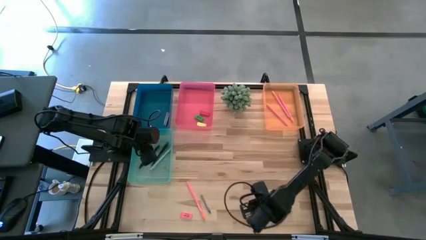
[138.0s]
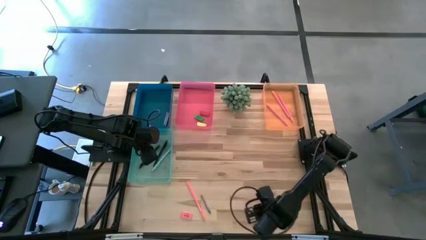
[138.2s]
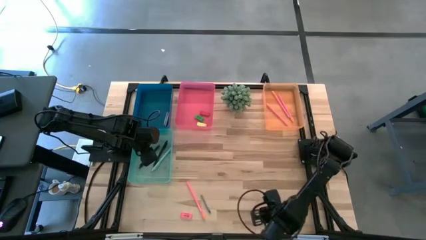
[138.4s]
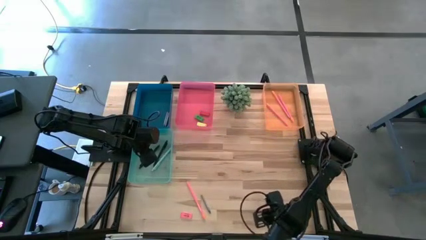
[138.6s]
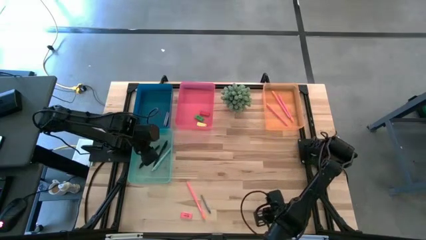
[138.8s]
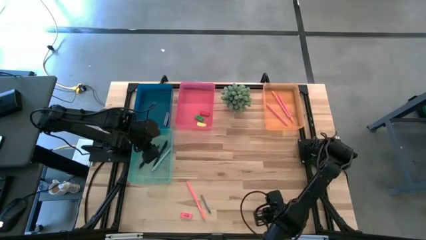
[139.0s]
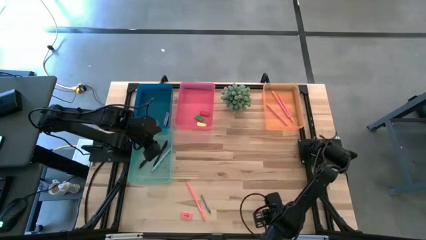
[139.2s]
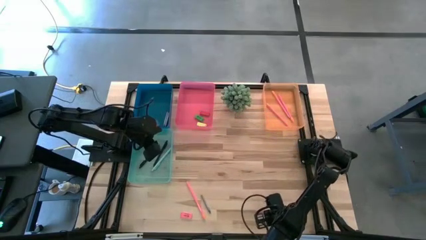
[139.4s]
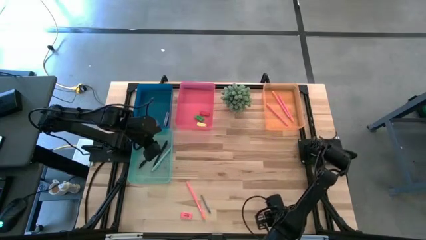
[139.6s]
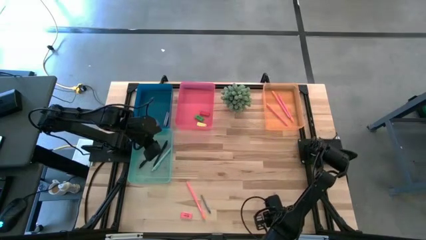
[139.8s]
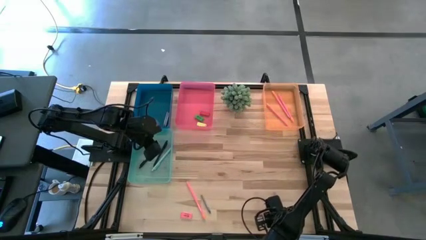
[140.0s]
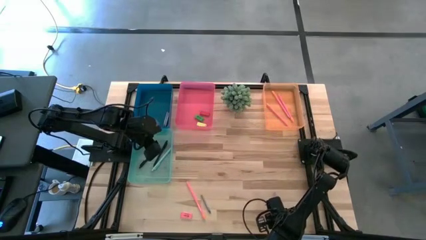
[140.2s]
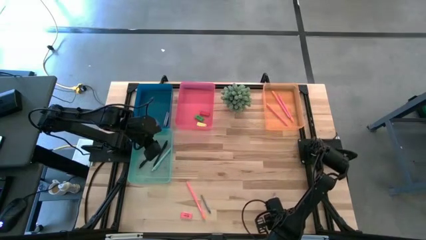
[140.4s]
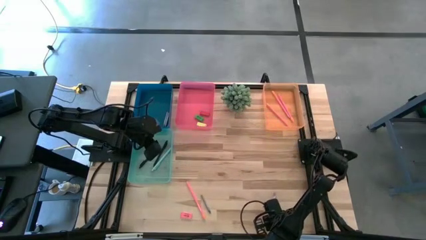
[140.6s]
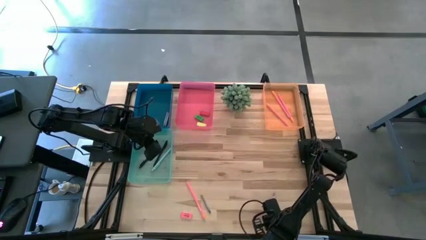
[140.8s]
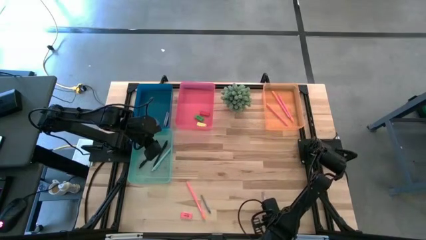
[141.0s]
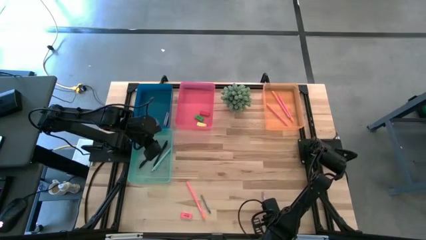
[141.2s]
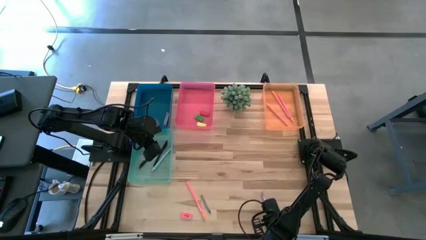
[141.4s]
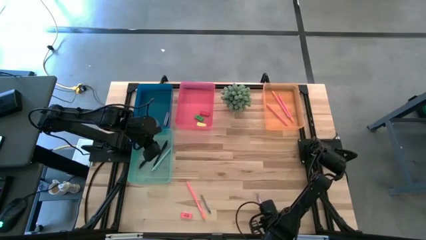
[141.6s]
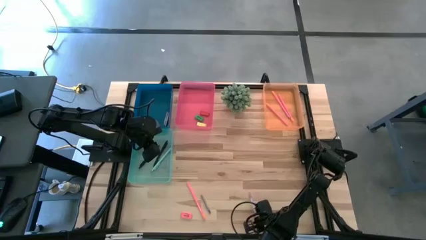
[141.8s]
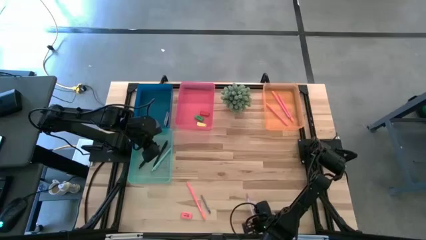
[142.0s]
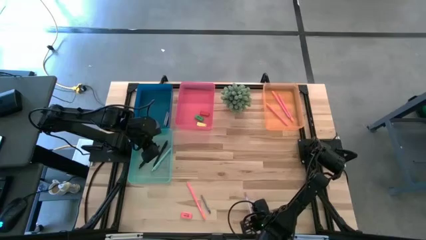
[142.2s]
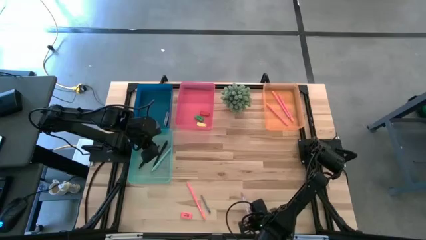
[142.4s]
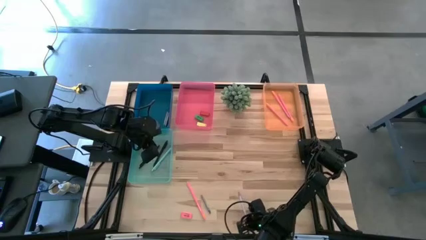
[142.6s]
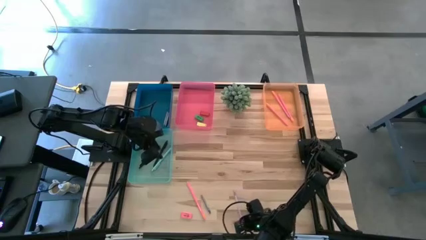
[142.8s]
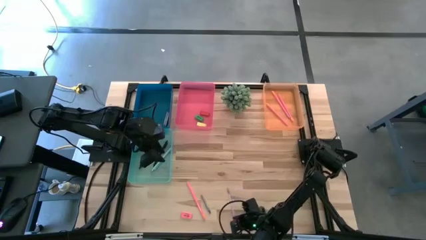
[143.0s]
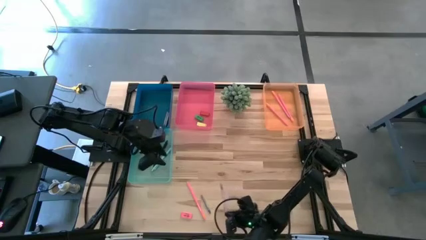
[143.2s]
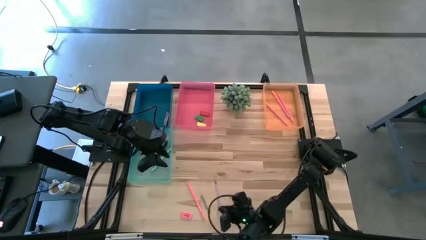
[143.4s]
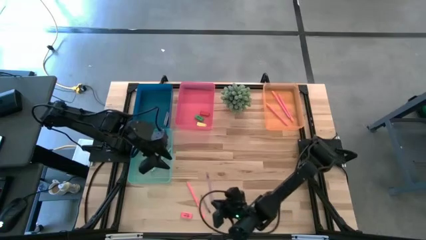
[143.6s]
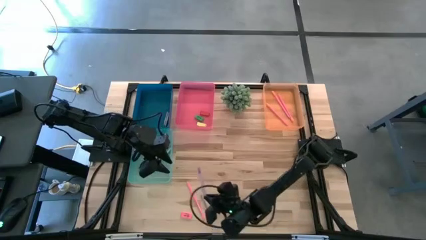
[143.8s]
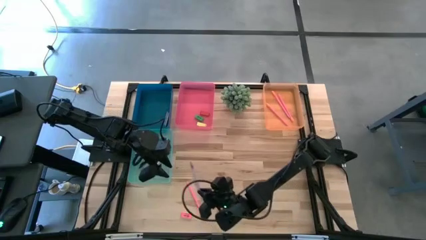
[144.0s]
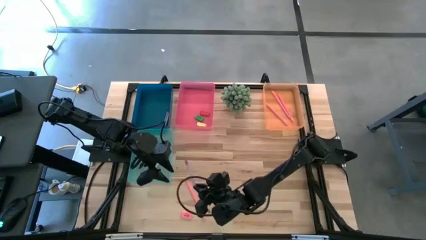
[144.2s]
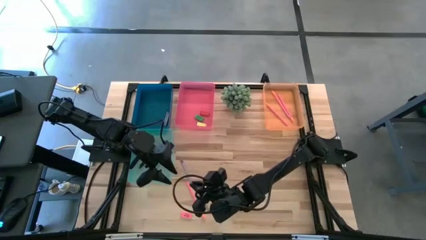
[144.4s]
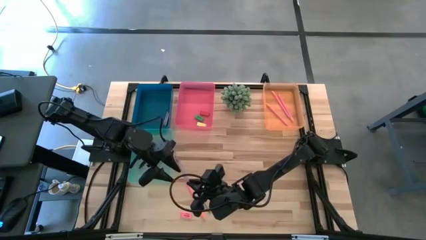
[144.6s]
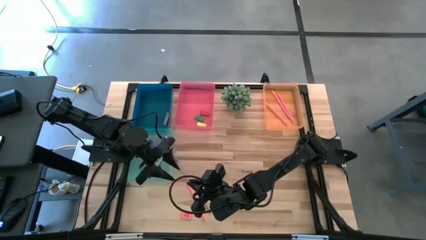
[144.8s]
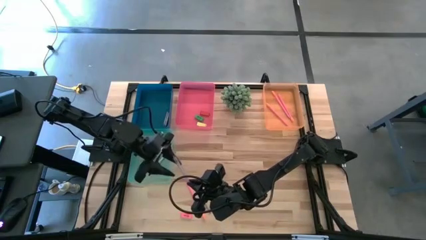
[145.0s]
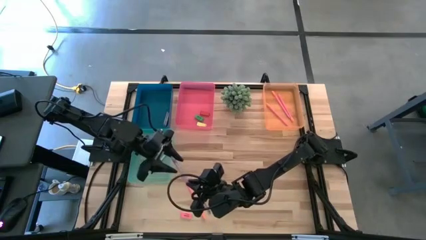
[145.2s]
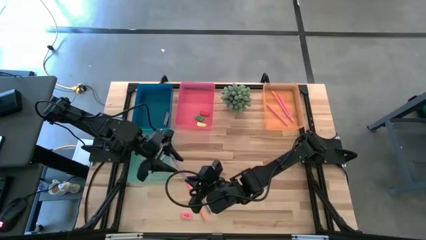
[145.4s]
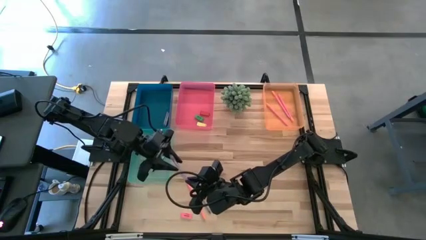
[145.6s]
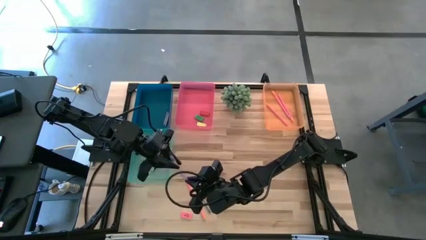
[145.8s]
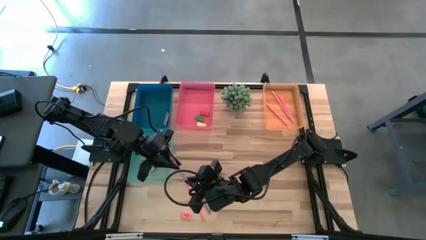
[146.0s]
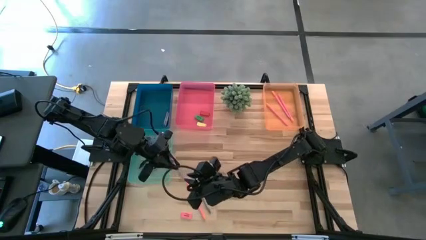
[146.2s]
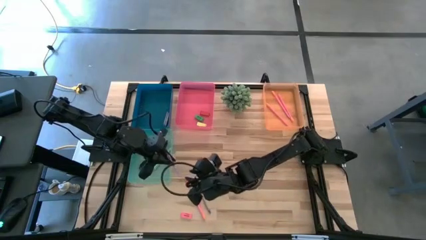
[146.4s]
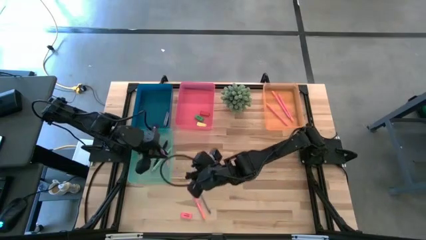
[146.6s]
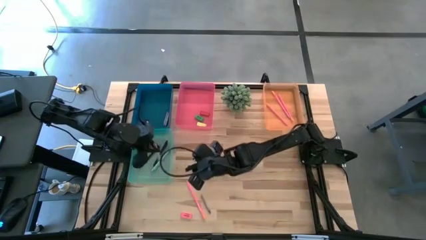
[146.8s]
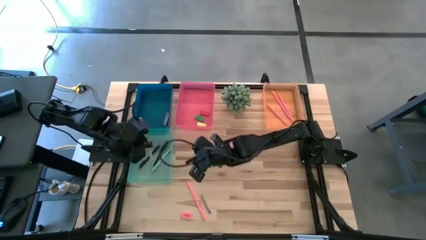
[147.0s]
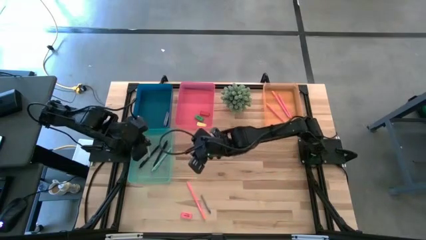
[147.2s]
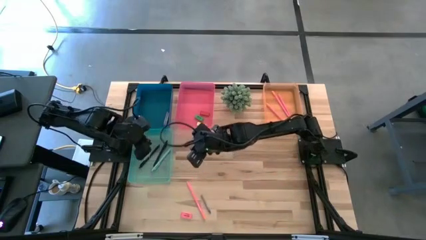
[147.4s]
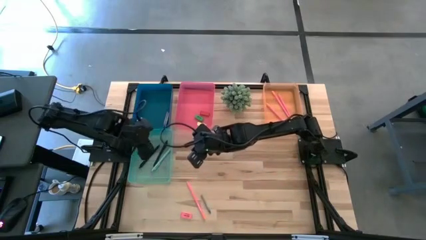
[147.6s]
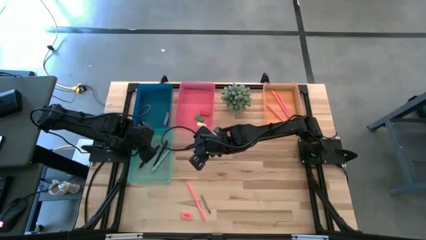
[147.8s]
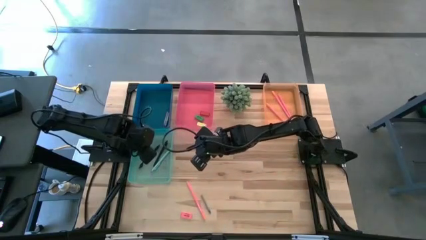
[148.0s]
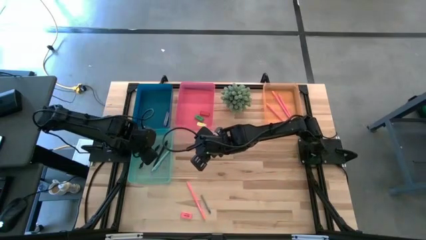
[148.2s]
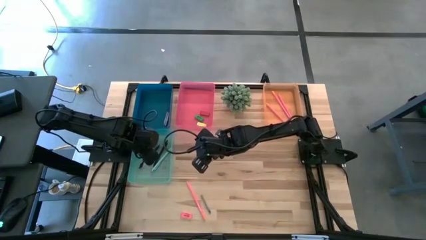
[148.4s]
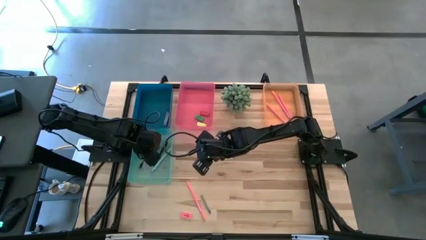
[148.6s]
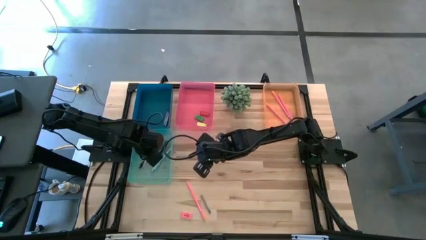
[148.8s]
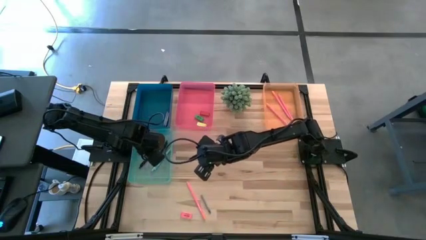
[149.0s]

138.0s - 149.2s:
Task: Sort crayons/erasers/pens/pencils in bins
Put the purple pen into the light blue bin

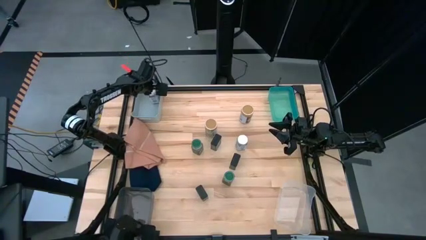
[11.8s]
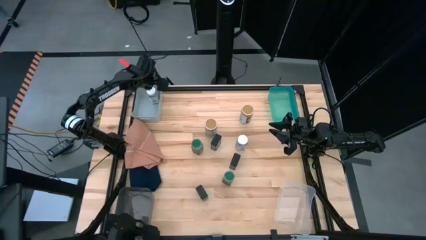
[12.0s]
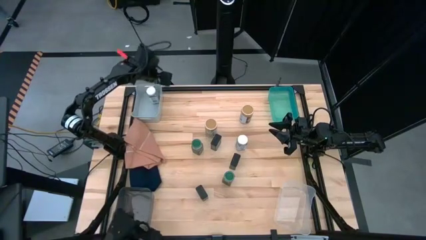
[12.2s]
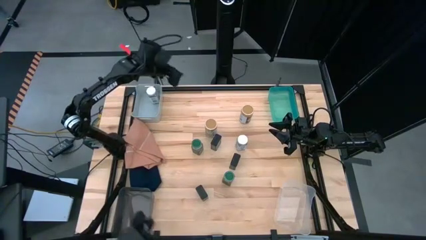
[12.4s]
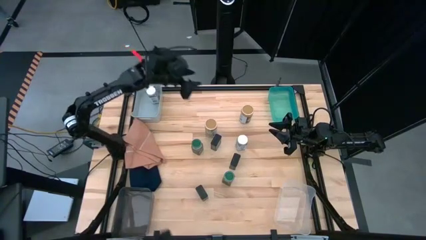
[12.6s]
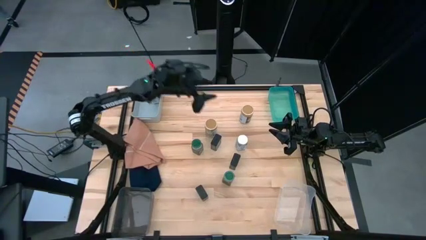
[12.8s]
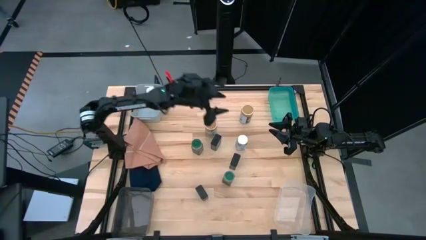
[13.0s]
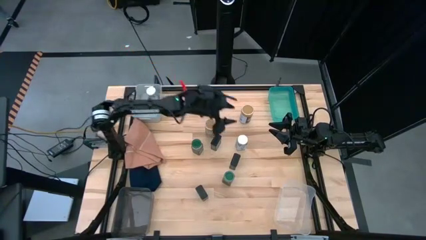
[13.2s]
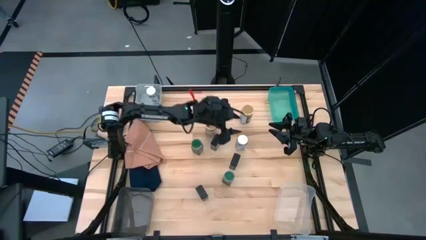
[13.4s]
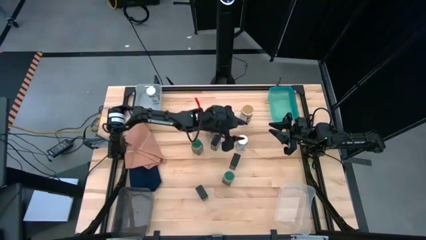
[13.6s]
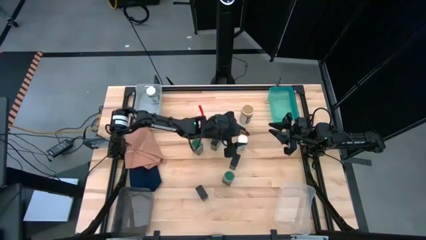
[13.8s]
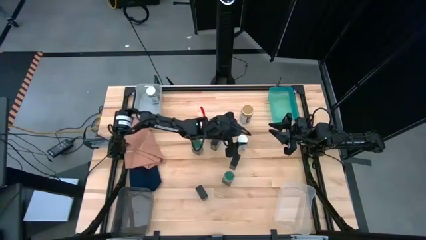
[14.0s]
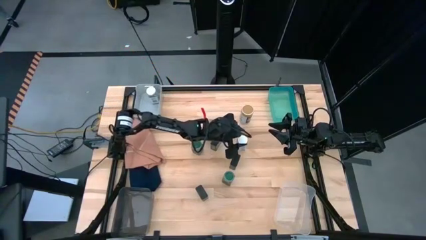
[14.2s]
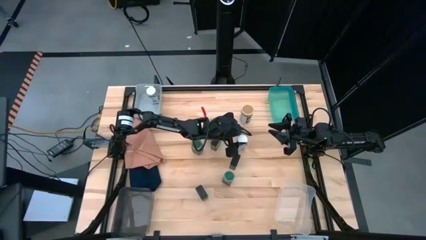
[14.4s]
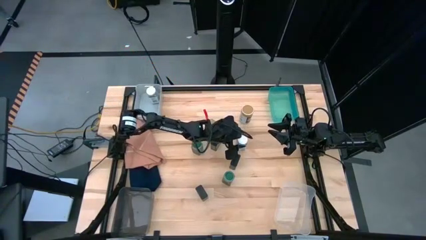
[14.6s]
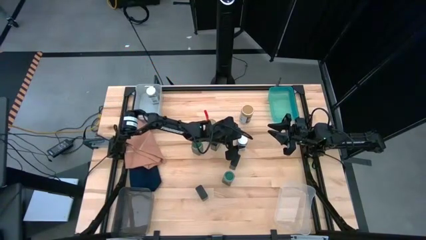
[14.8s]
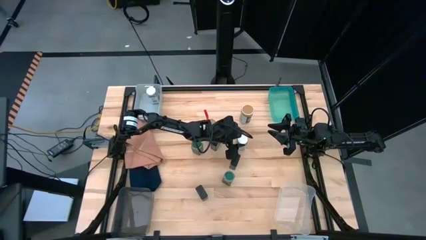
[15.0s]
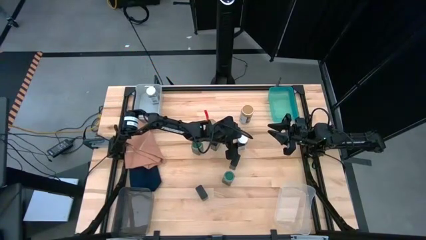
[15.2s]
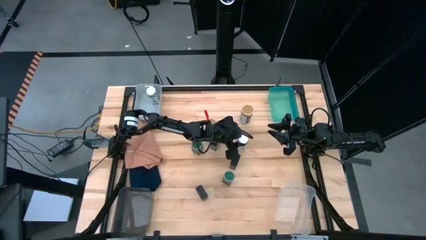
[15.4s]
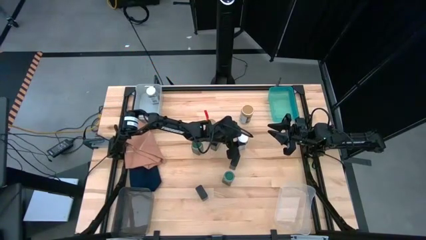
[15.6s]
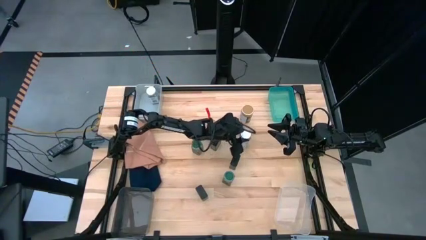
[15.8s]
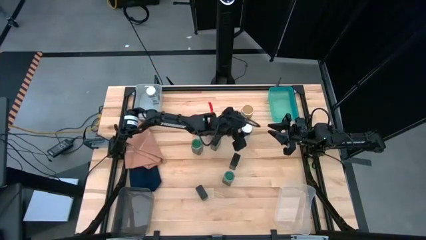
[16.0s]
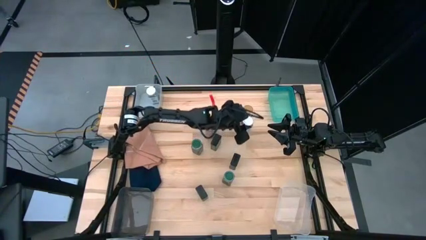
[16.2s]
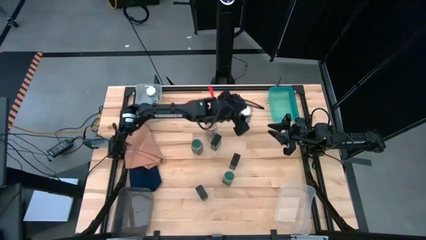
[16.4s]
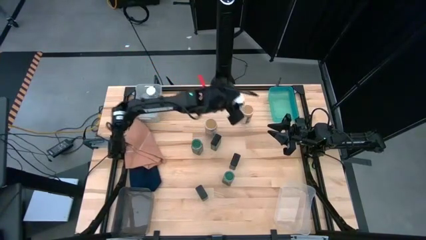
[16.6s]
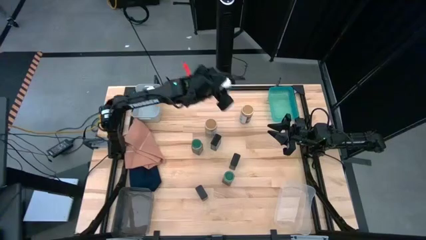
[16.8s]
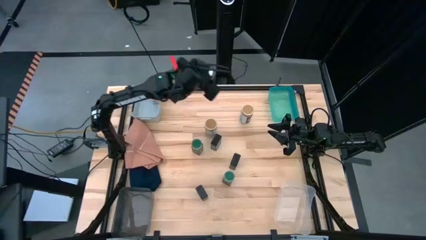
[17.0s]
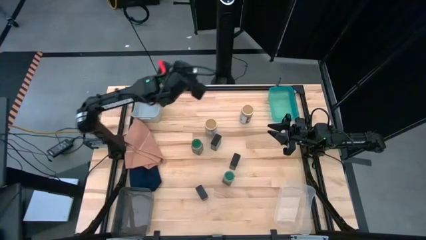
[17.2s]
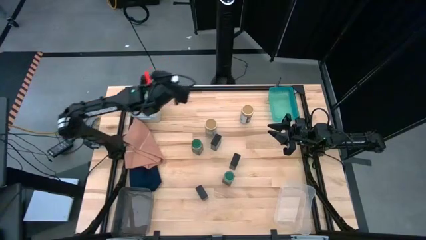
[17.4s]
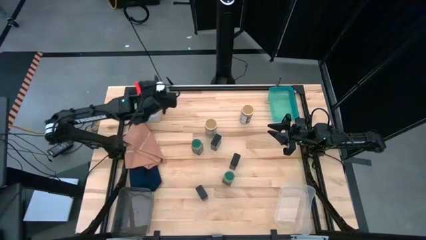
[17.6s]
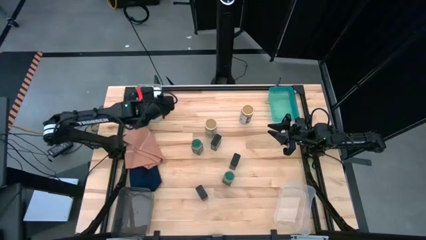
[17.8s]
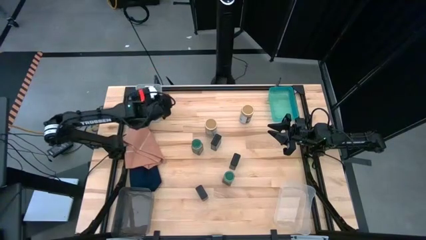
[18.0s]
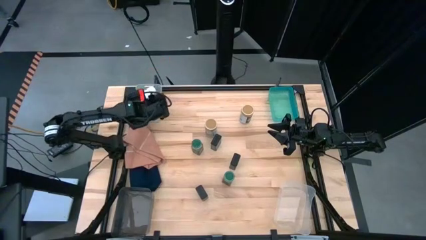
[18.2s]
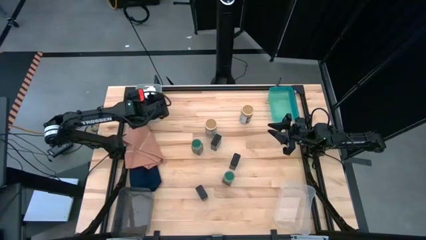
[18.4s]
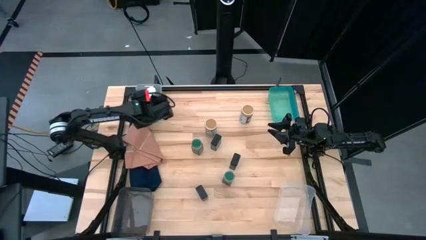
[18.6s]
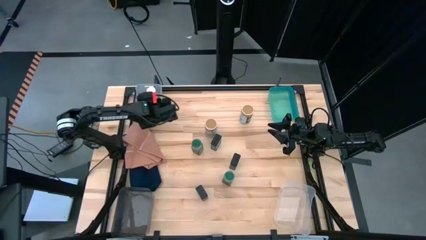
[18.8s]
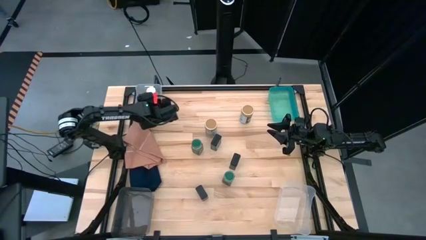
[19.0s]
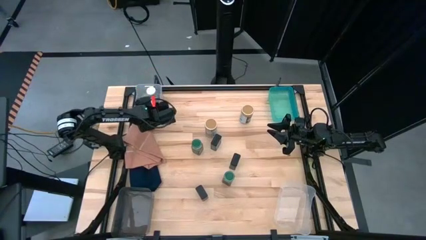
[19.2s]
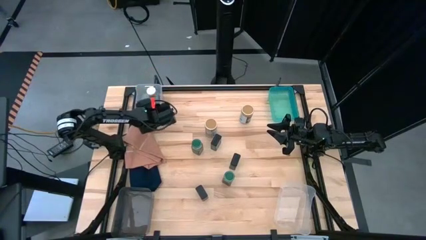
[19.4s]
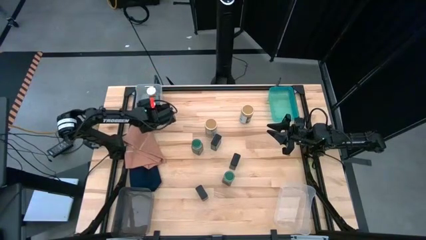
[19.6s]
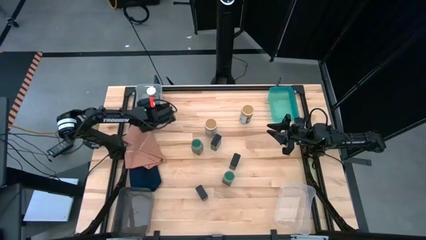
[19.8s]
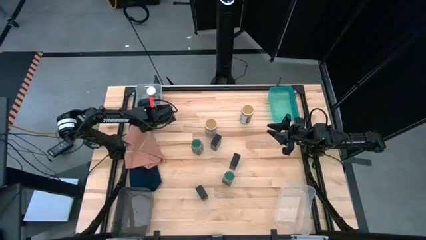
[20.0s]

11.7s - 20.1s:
Task: Sort spices by type
Put the white spice bottle into the grey bin
